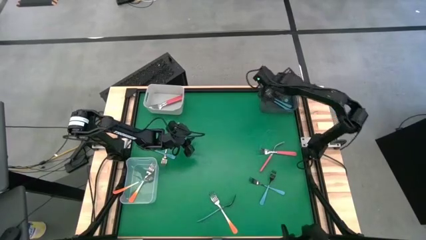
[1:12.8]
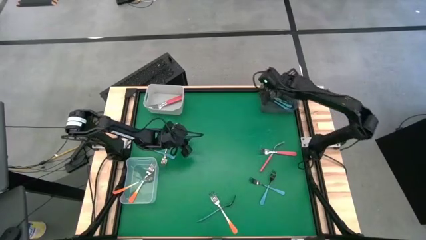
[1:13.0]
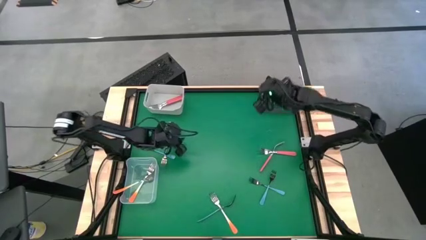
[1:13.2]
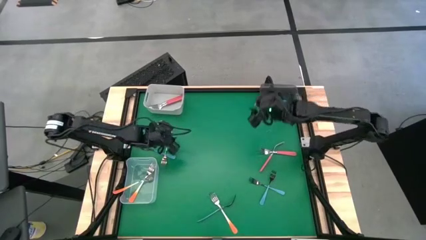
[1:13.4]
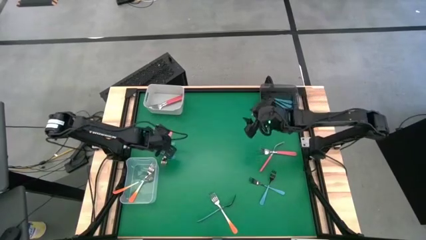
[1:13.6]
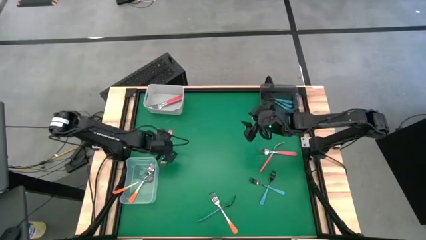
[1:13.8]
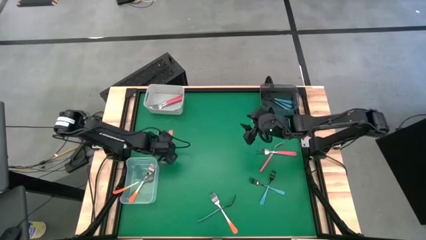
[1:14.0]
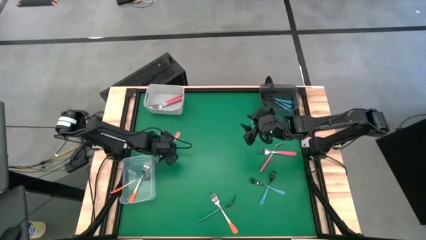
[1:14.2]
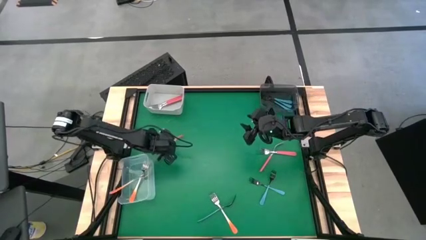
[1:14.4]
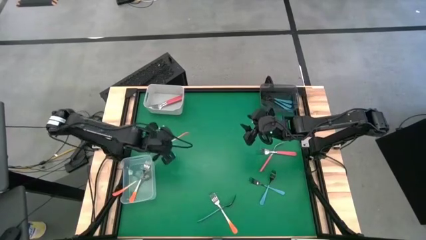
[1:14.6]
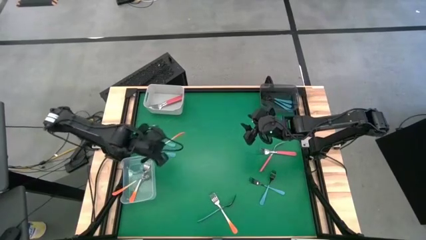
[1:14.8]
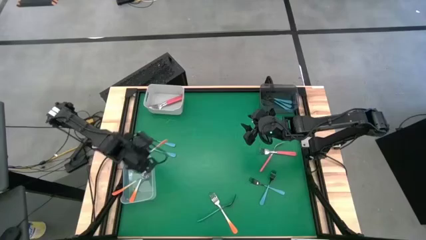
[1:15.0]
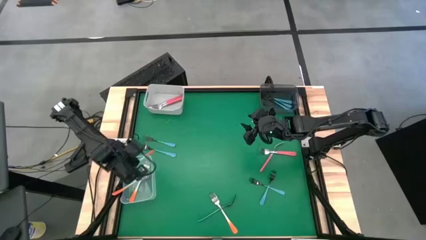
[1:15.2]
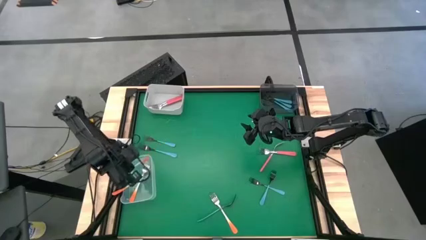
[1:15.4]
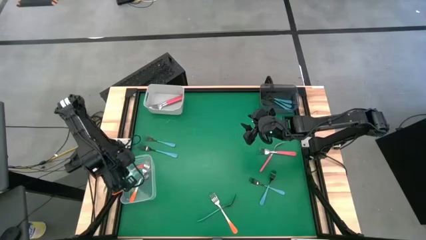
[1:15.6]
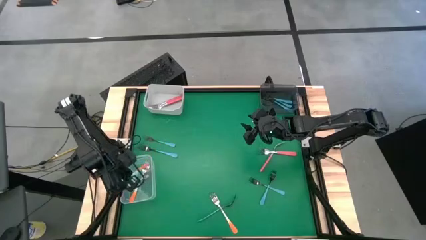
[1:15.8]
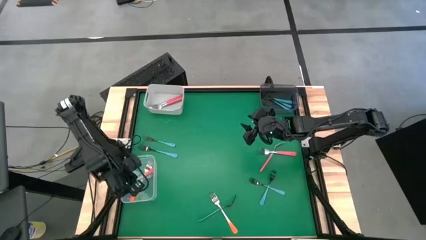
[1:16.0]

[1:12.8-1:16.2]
Task: Sort silverware by color (type)
Put the orange fork into the transparent bin

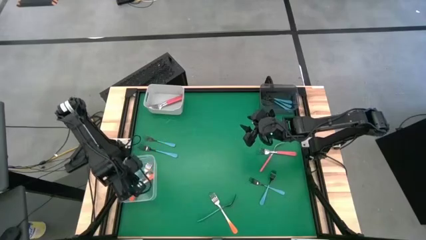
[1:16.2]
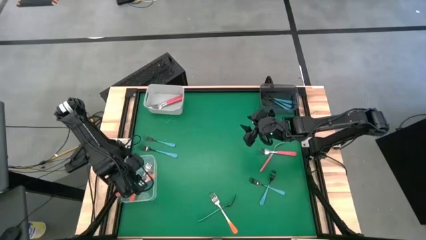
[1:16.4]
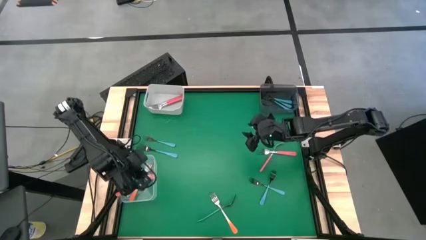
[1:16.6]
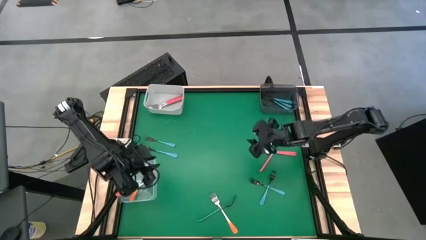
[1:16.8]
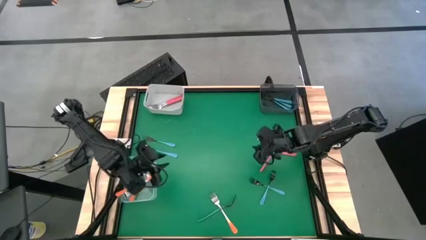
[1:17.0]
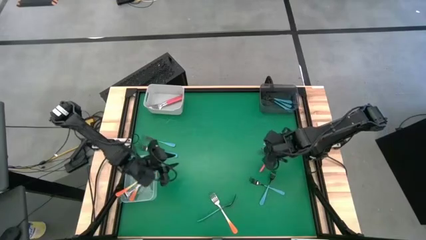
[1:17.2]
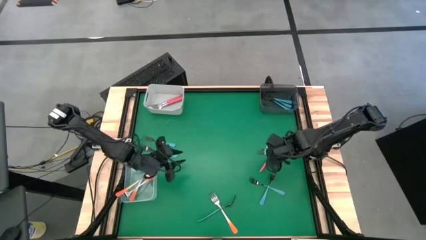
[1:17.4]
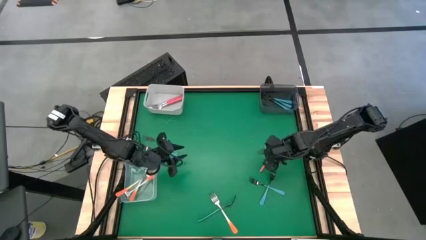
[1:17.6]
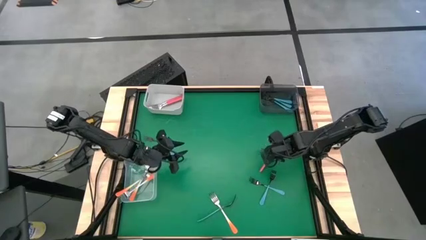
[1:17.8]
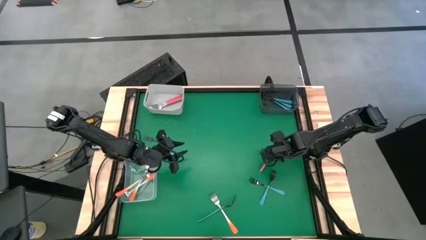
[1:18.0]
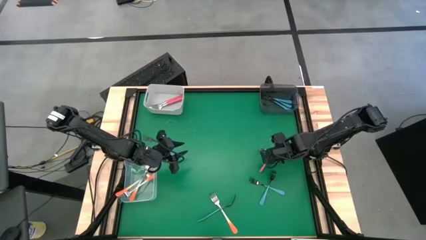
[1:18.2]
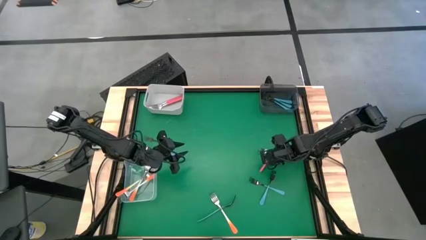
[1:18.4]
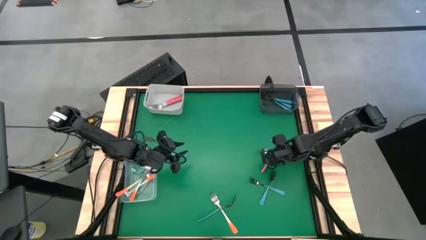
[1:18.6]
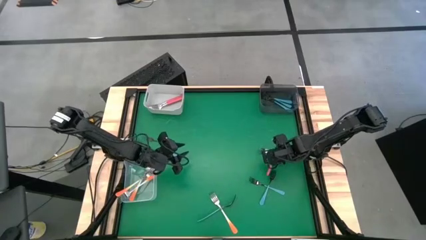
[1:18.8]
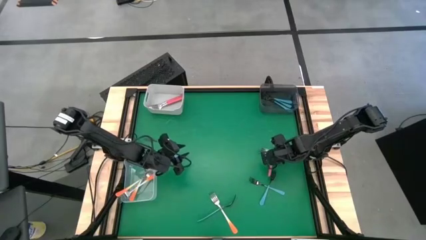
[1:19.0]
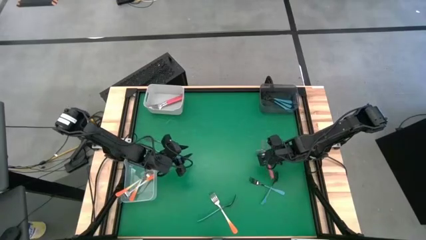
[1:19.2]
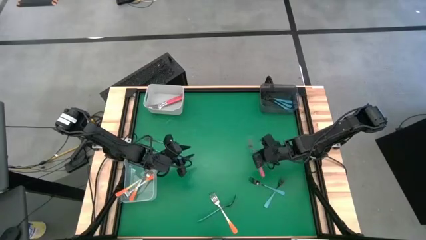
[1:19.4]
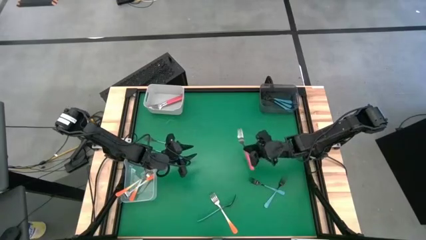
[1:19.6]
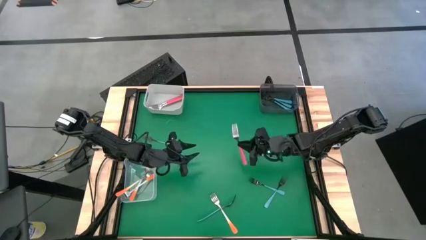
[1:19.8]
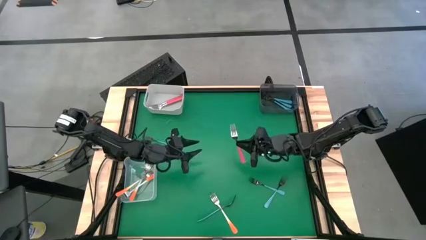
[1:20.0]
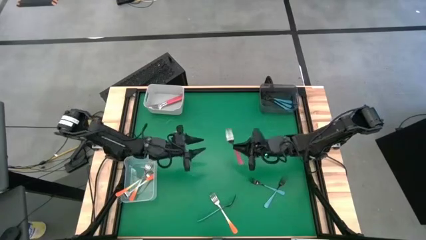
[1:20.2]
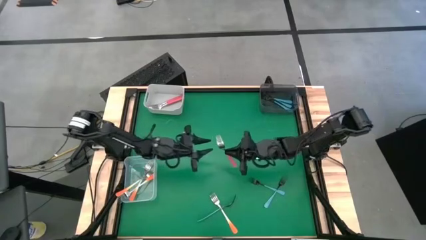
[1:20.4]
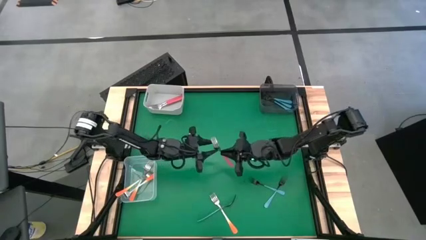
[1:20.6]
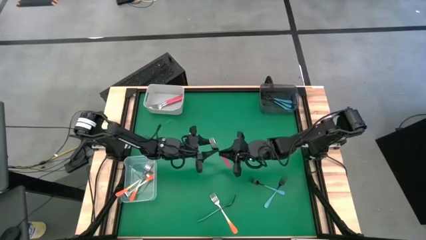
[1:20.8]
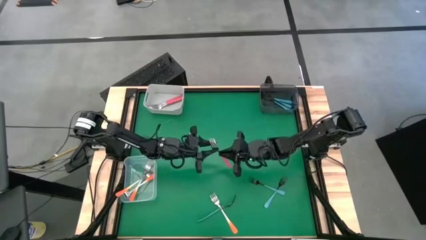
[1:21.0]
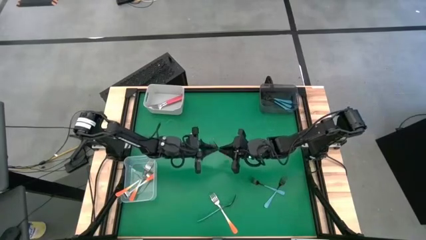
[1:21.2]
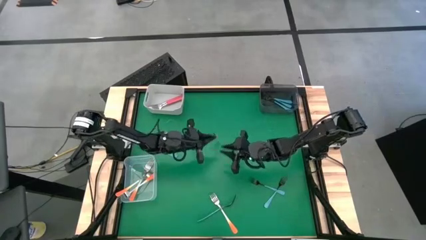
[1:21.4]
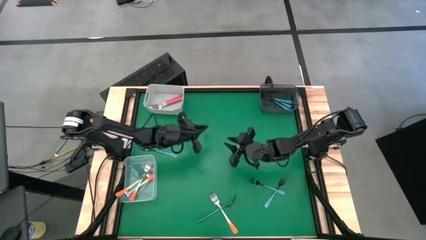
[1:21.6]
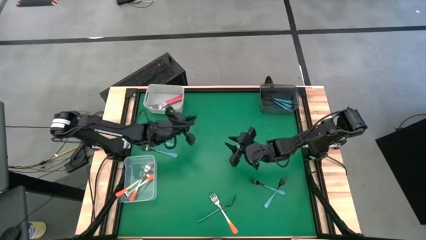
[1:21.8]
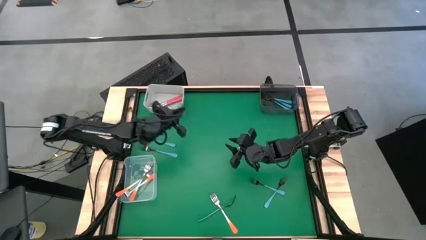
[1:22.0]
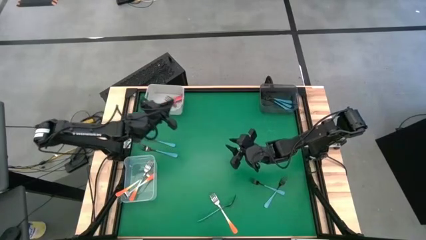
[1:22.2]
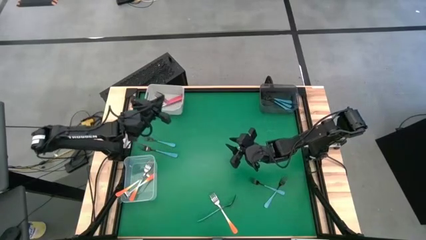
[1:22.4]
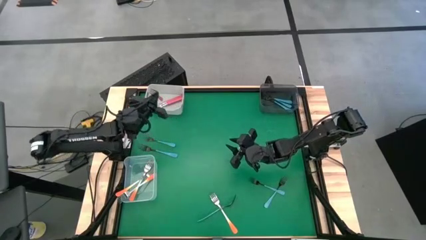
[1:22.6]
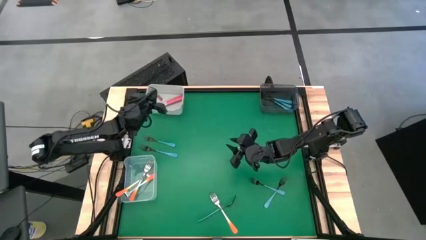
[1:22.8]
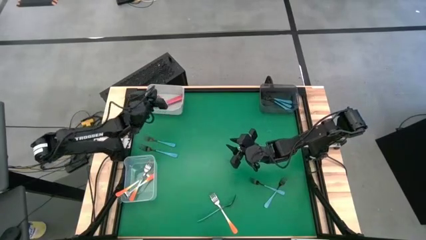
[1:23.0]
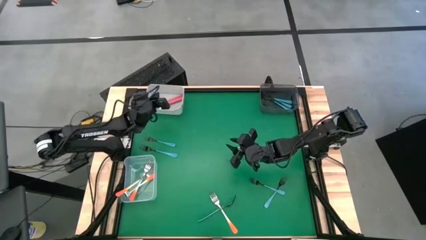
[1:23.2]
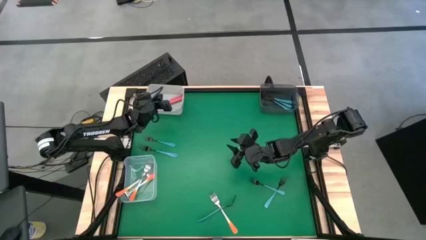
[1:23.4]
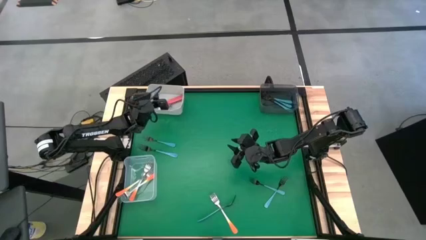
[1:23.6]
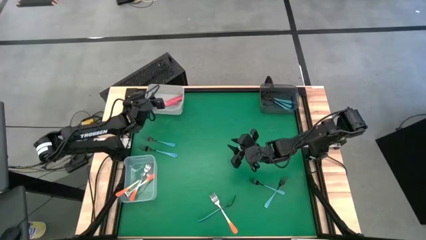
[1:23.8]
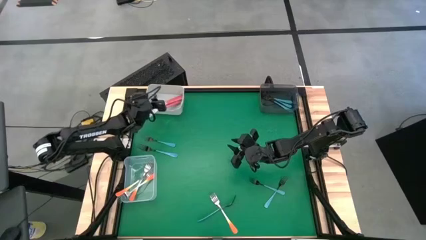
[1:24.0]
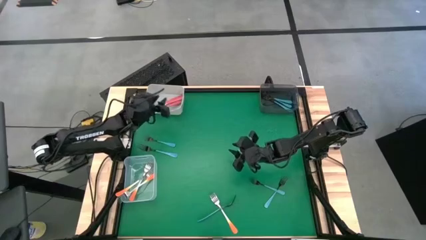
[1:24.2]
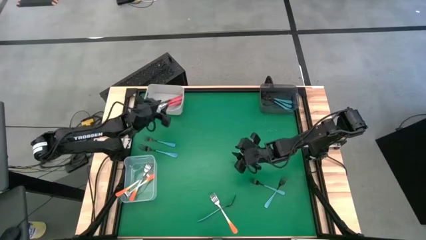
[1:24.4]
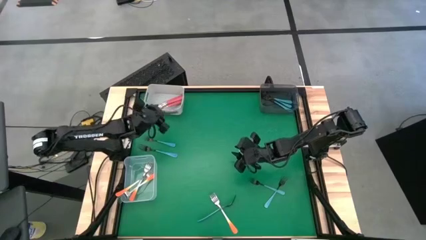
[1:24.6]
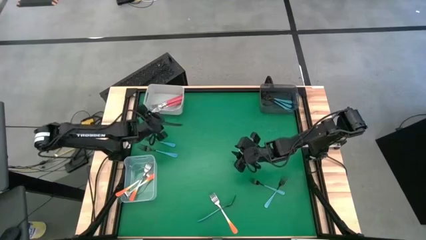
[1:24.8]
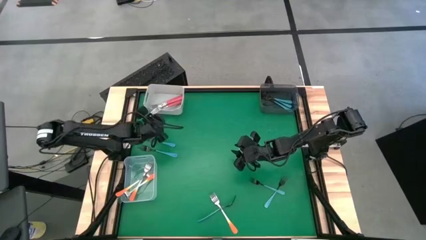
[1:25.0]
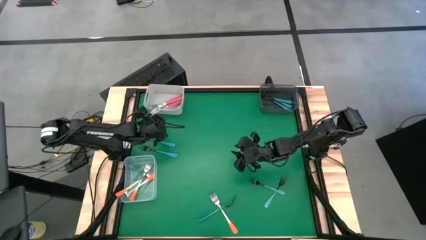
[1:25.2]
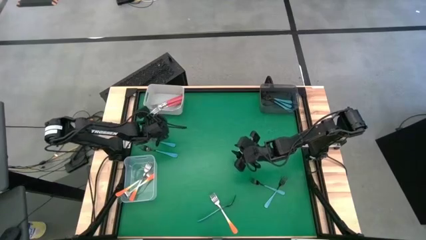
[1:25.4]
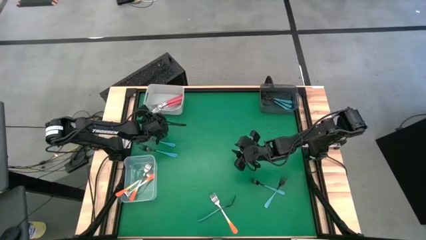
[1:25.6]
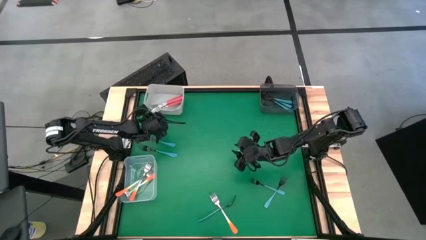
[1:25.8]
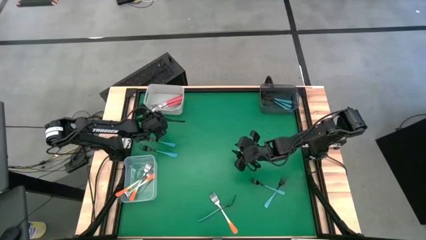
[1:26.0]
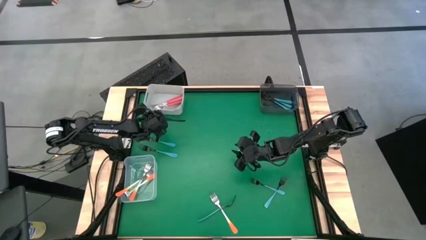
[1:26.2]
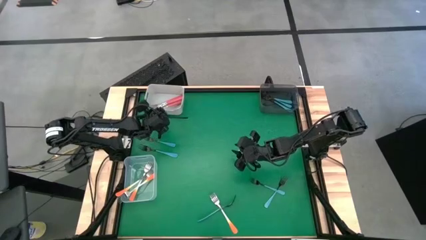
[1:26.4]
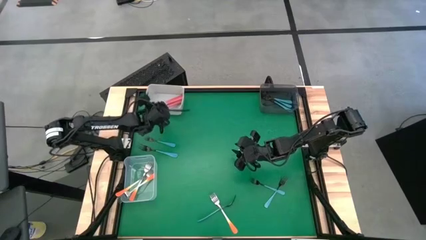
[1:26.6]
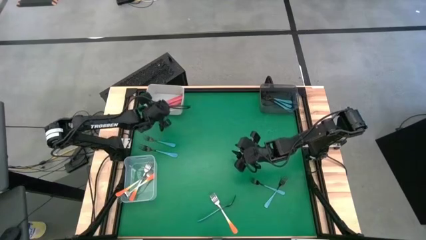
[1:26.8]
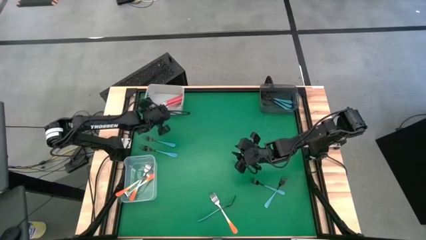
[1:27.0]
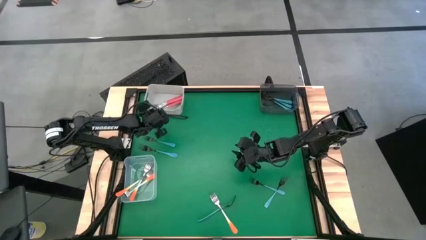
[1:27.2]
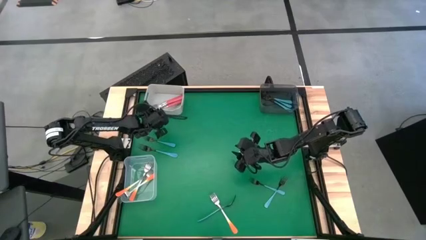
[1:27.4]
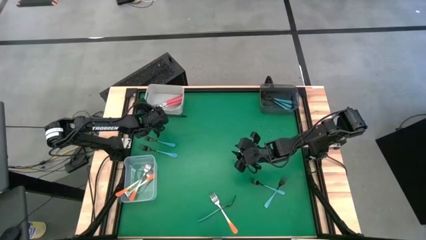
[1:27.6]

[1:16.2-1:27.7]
Put the pink fork into the white bin

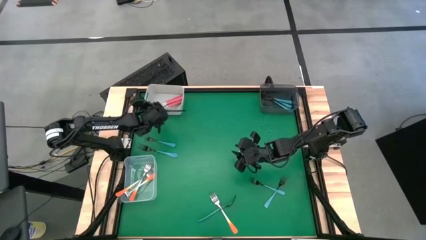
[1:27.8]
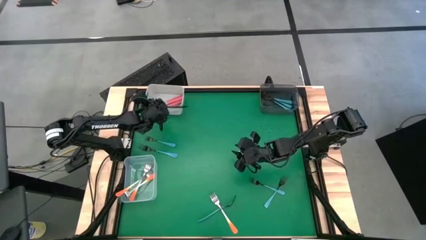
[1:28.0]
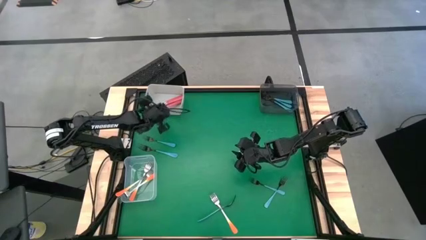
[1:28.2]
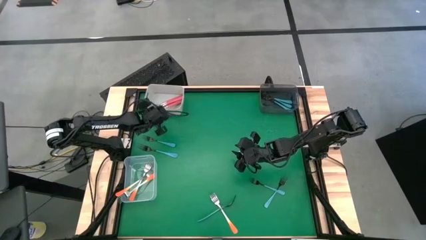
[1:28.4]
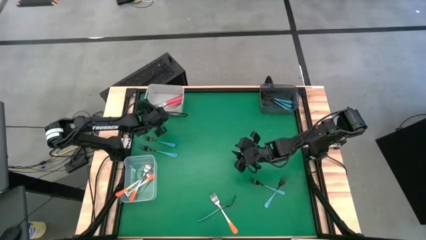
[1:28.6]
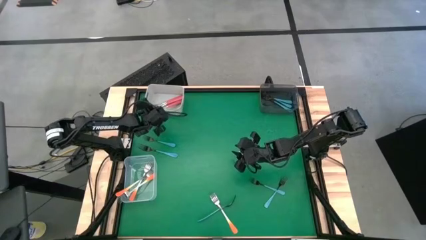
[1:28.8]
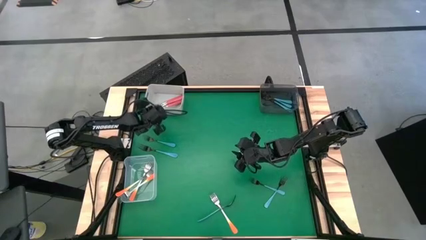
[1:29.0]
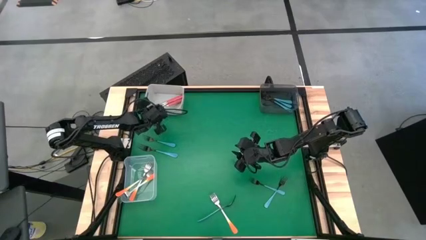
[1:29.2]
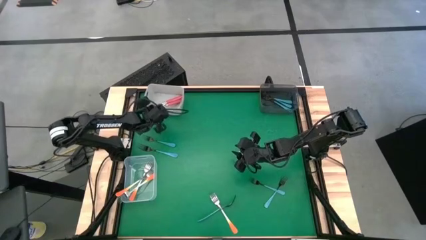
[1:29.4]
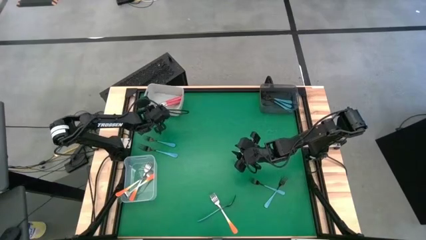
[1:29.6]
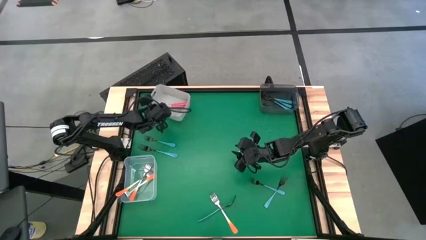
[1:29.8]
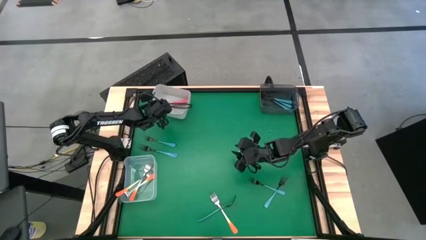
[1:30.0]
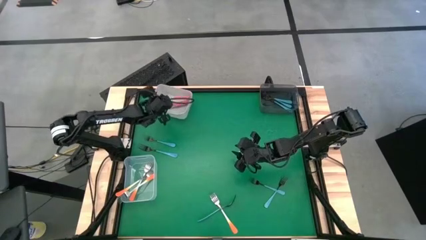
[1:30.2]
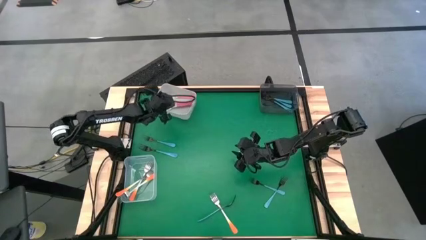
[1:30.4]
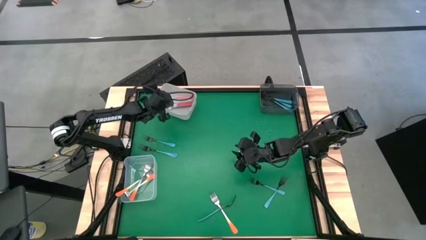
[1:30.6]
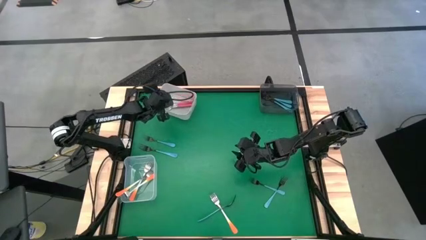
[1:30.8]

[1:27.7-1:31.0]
Put the pink fork into the white bin
